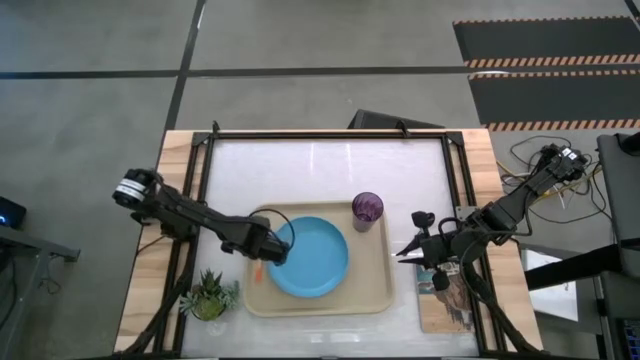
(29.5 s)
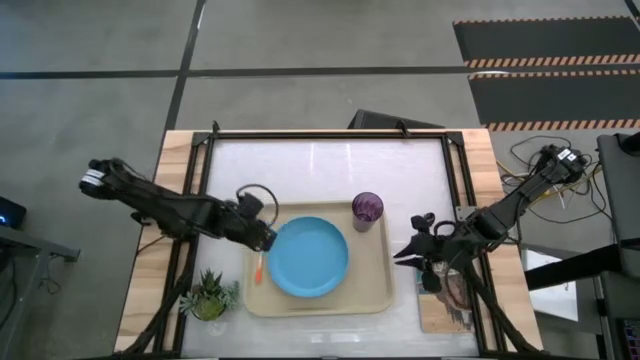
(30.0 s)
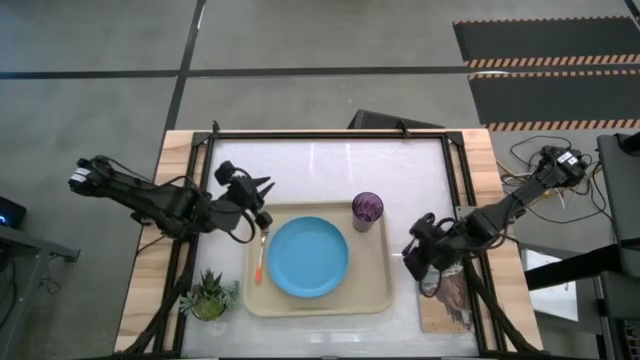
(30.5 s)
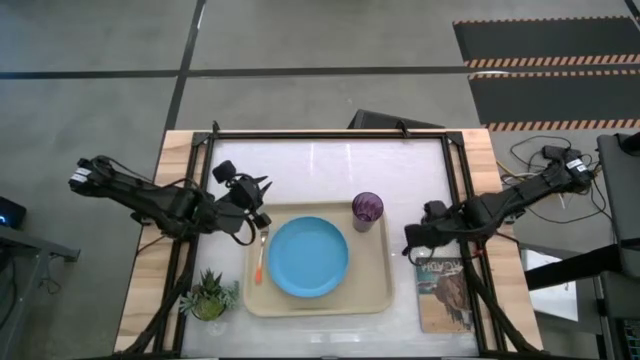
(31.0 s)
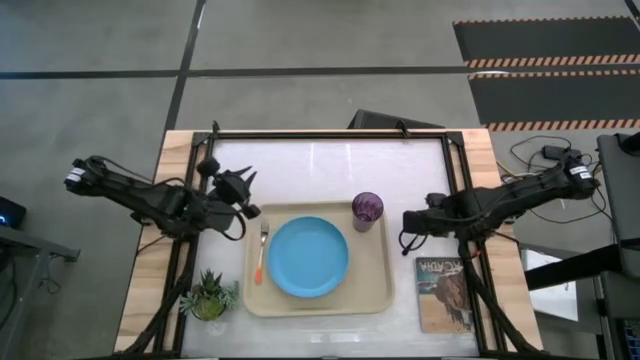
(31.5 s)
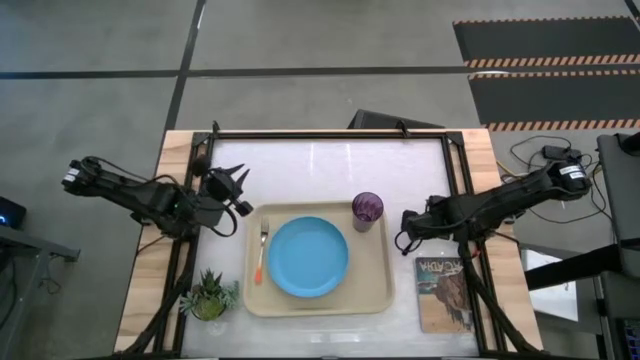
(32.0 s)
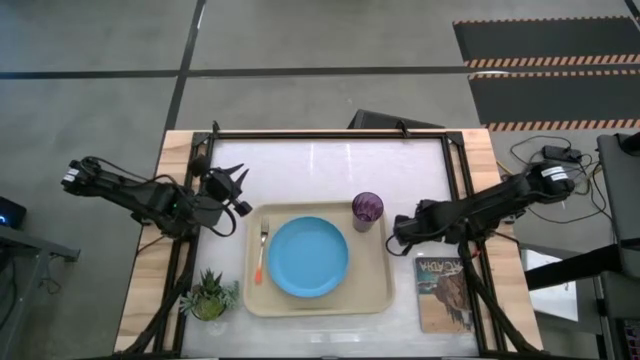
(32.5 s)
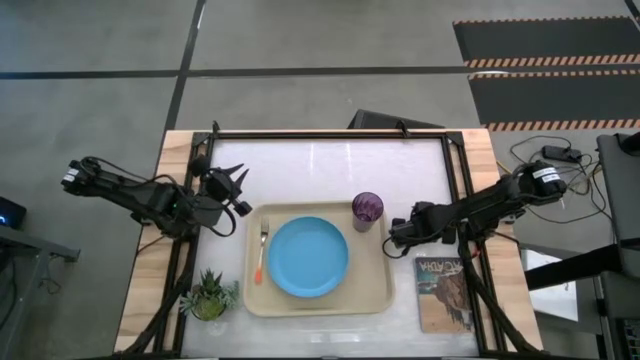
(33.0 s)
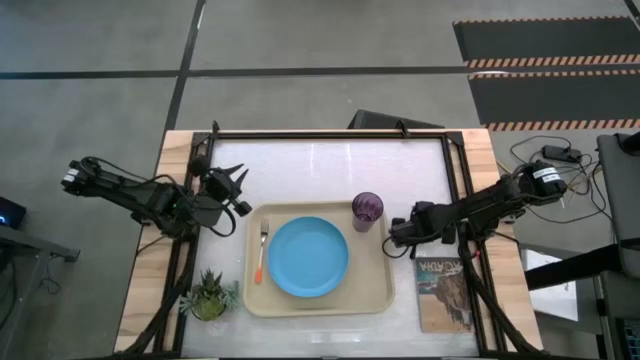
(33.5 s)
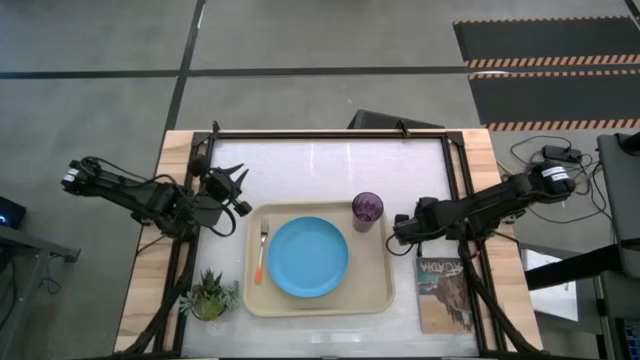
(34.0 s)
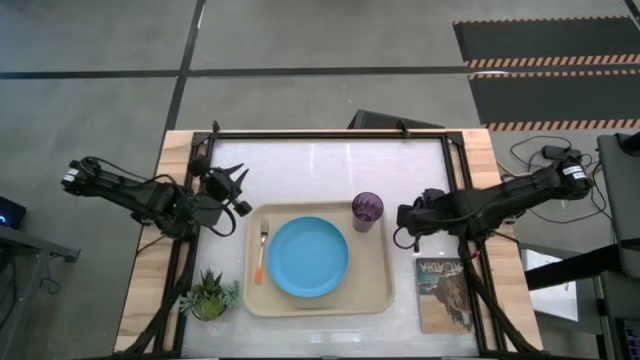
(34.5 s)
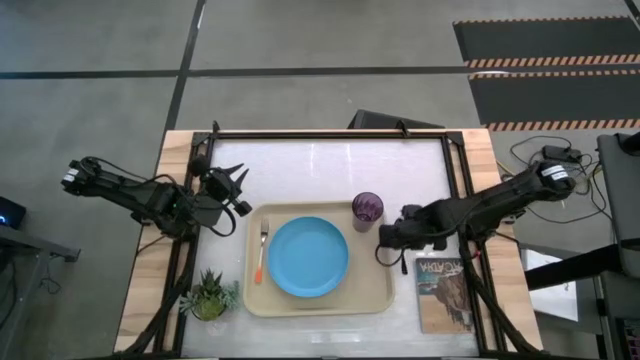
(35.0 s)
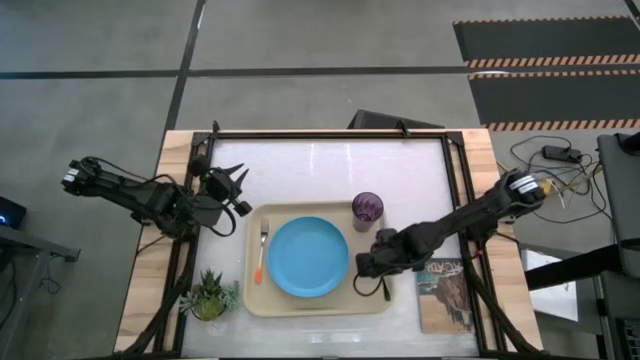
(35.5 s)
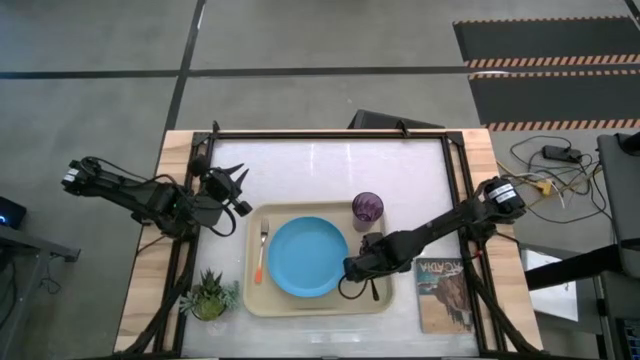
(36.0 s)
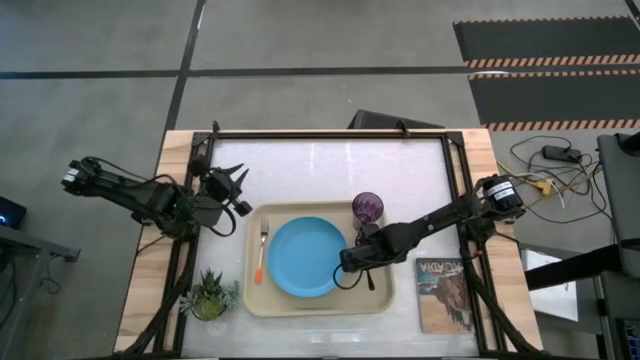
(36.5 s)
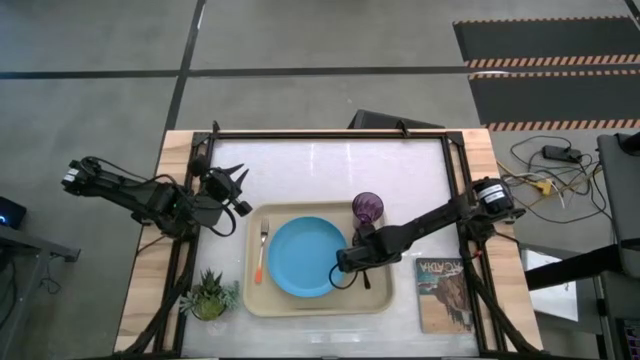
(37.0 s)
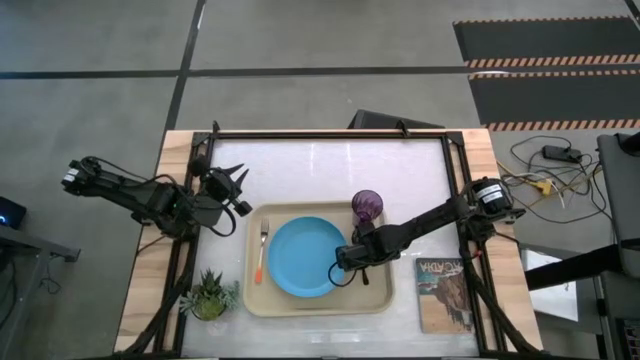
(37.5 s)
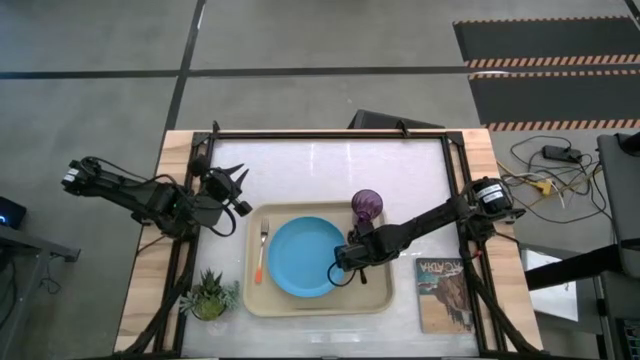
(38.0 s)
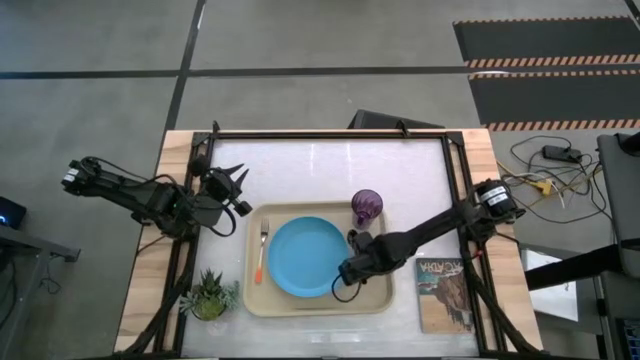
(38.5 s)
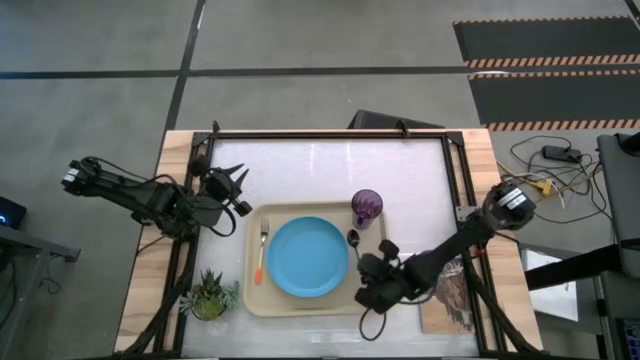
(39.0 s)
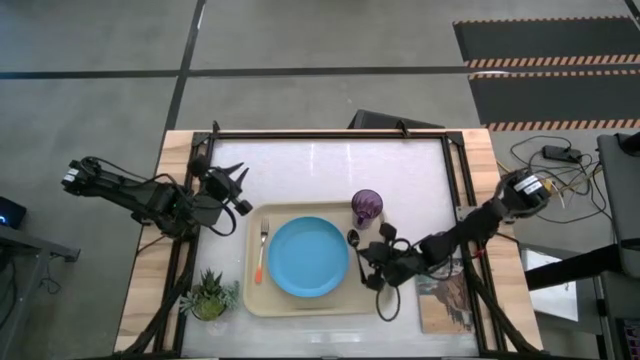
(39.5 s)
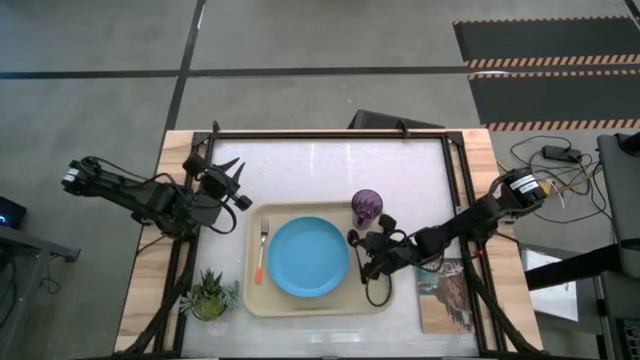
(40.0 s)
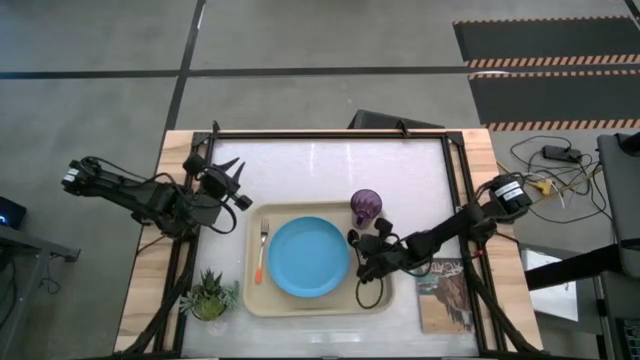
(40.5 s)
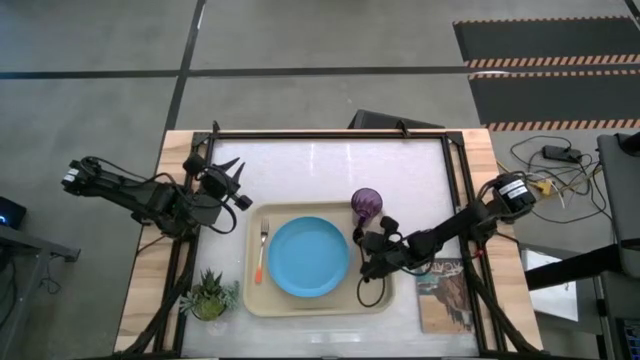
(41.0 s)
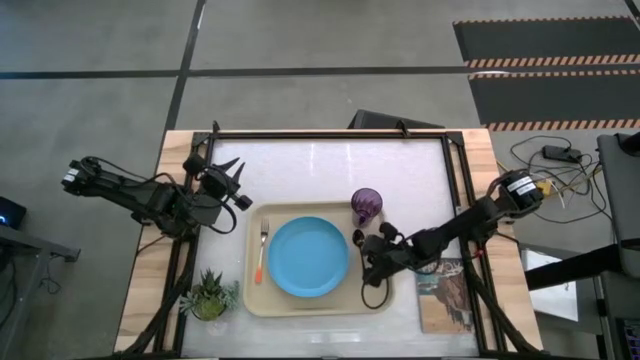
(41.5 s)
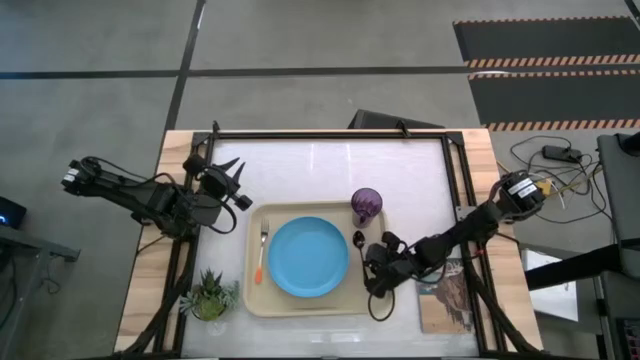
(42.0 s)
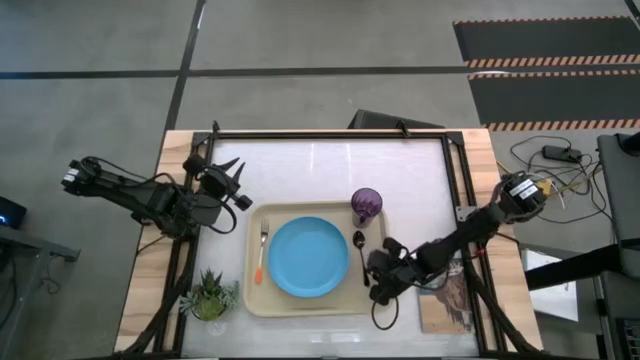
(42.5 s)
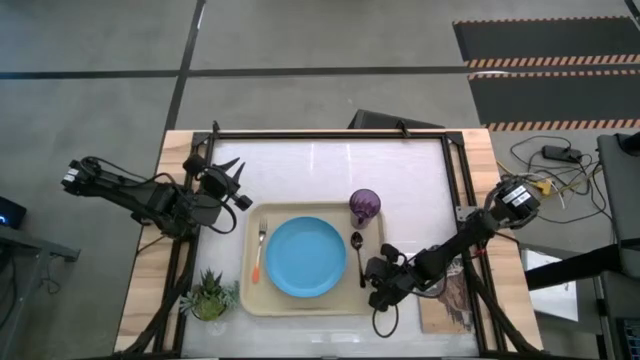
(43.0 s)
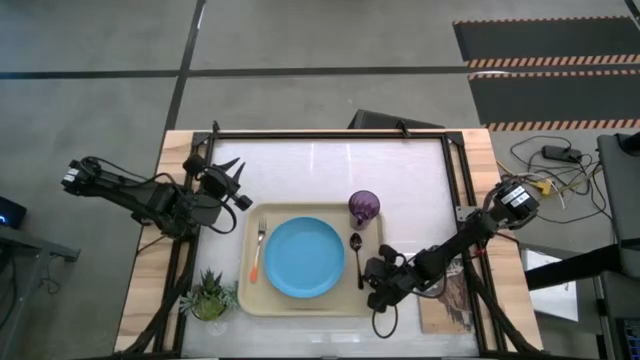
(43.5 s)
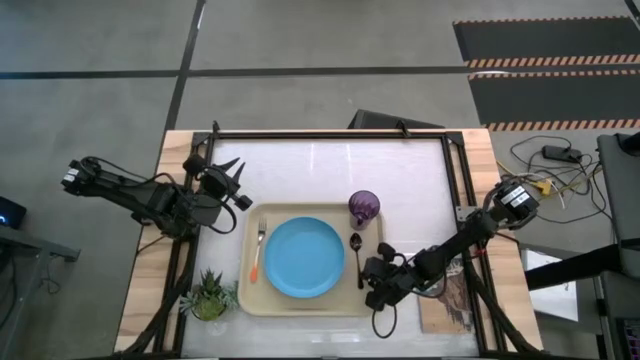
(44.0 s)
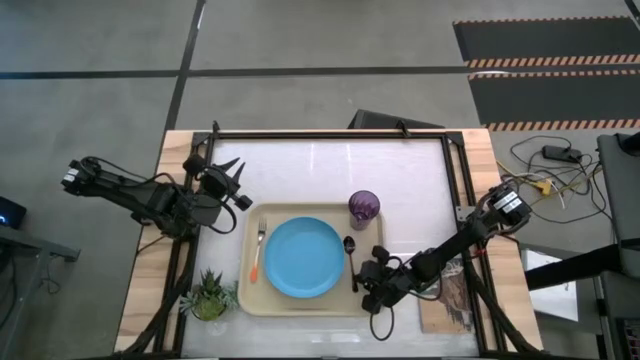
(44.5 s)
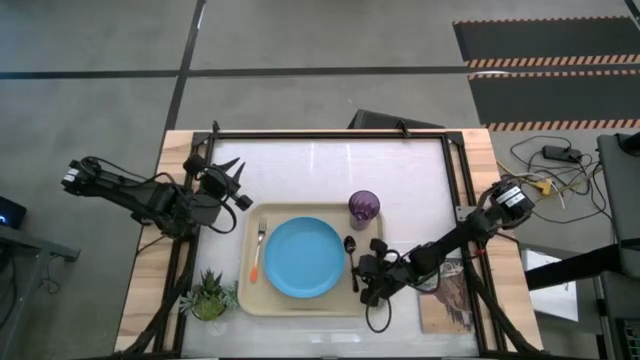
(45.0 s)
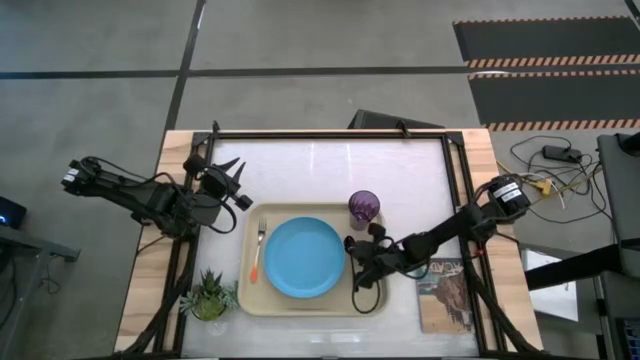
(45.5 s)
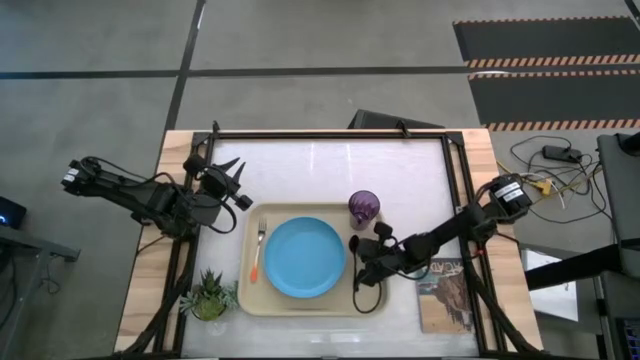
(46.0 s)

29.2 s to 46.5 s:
Task: Pick and place plate/cup/fork/spoon on tray
Put the black spoon on the white tray to the right side of the blue plate

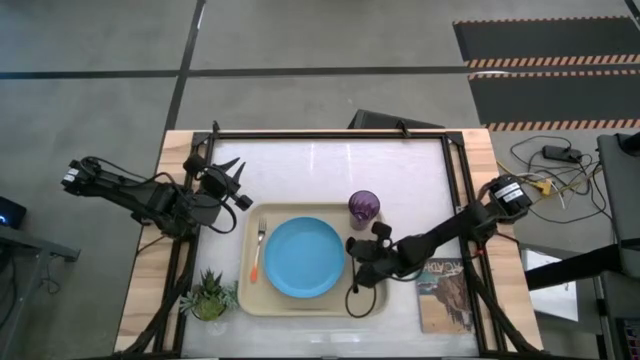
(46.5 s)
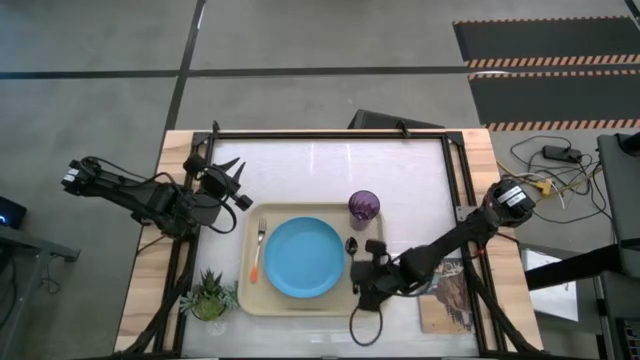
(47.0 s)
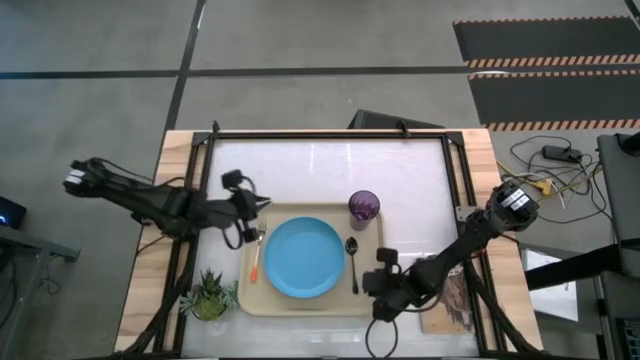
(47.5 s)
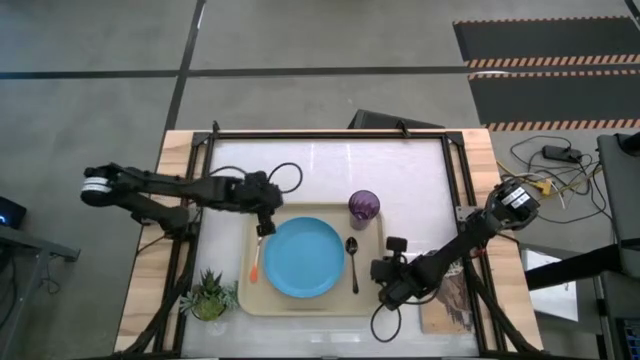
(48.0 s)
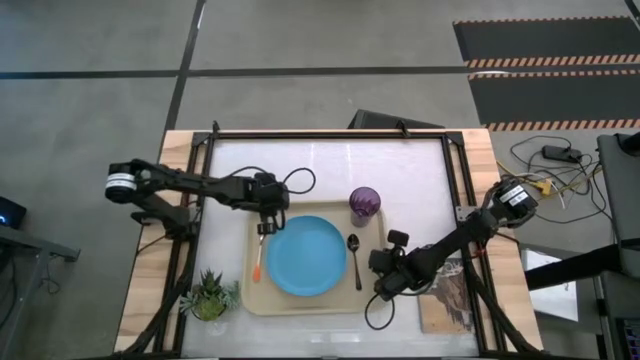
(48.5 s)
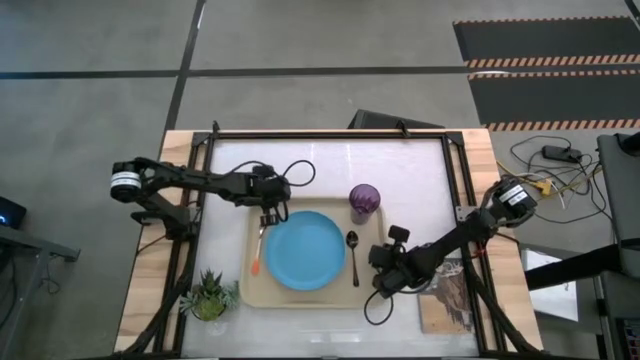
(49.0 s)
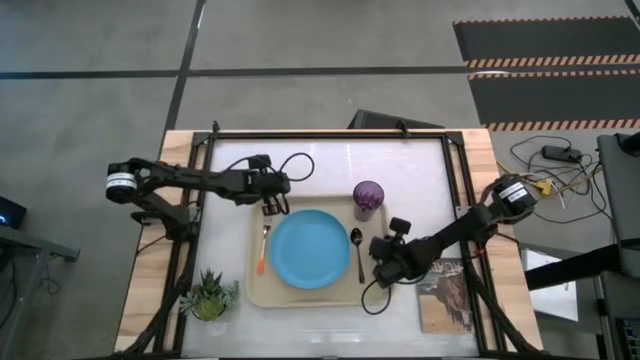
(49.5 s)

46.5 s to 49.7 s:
Adjust the white tray

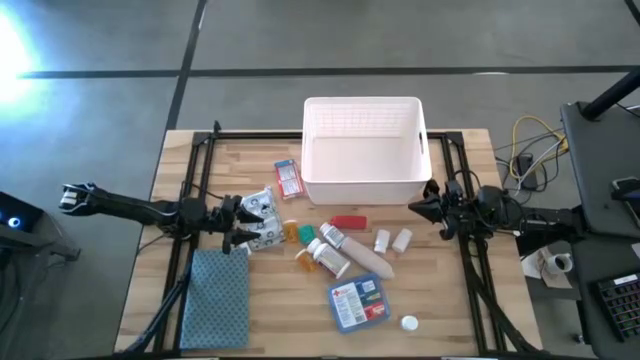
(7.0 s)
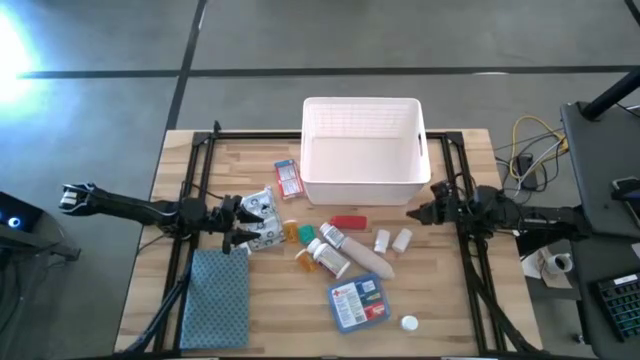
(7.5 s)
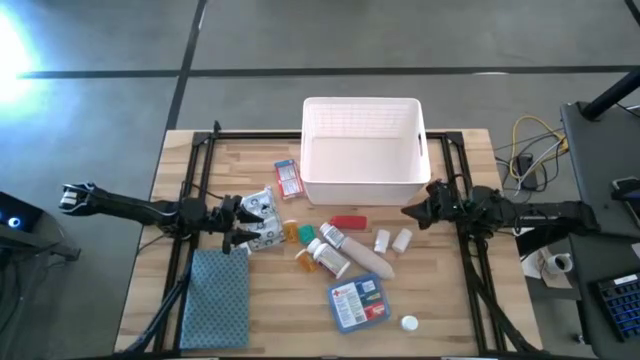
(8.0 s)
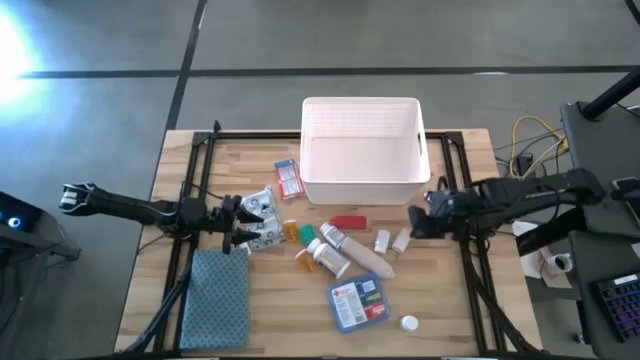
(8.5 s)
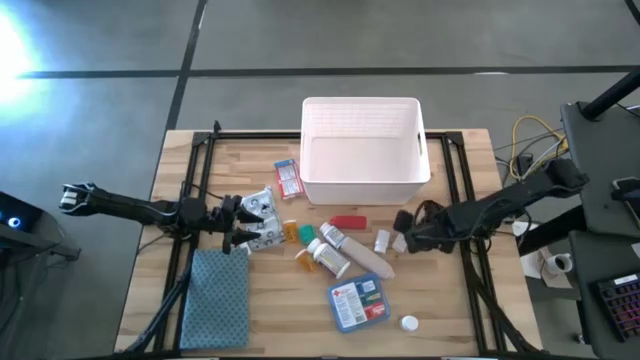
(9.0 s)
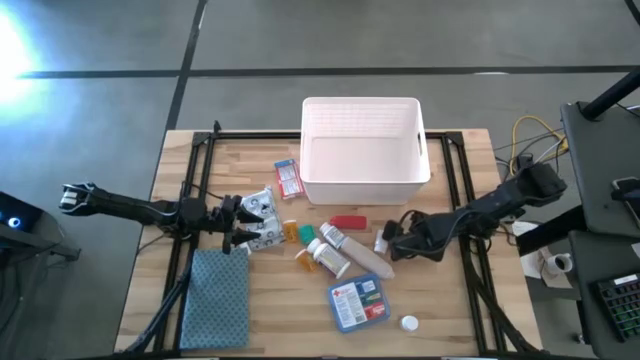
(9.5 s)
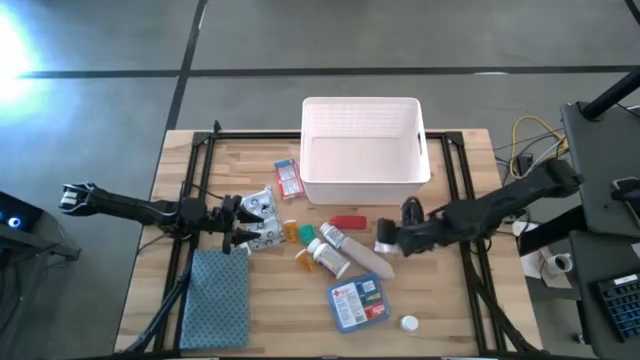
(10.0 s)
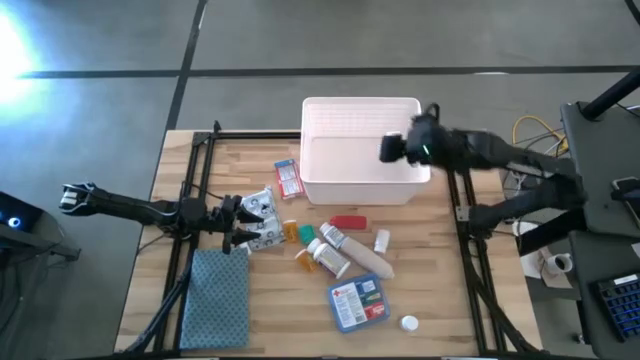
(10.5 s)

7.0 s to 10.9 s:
Task: Pick & place medical supplies in basket/bin
Put the white medicine bottle into the bin
